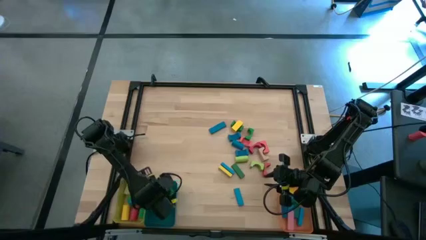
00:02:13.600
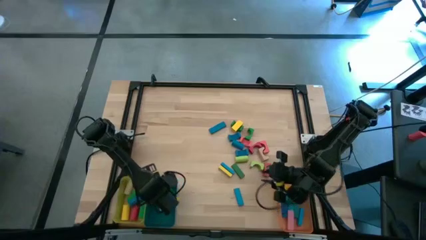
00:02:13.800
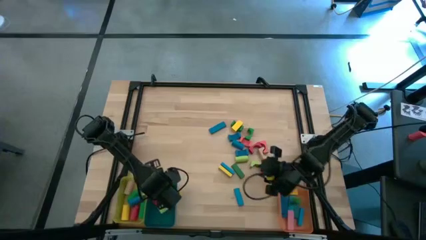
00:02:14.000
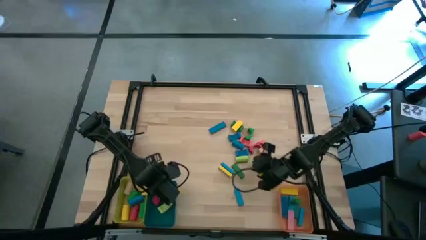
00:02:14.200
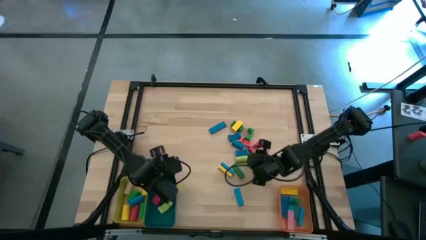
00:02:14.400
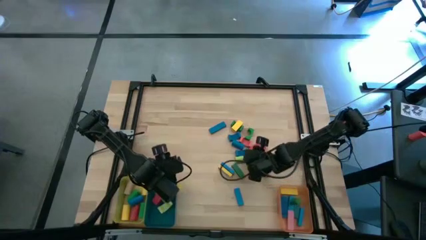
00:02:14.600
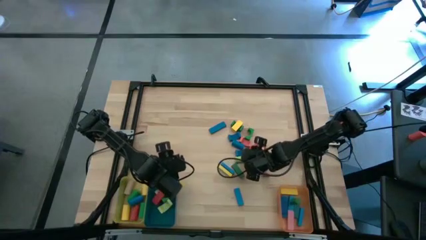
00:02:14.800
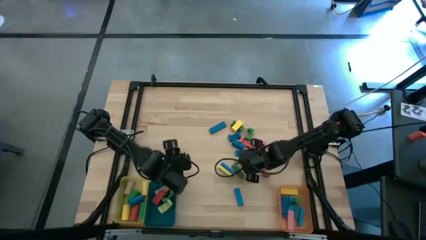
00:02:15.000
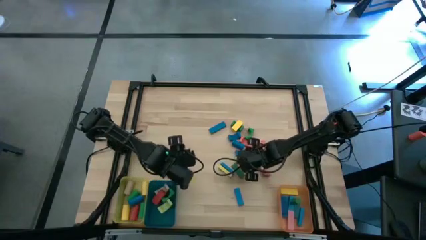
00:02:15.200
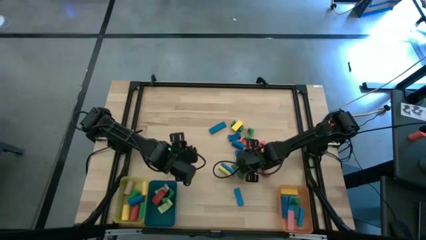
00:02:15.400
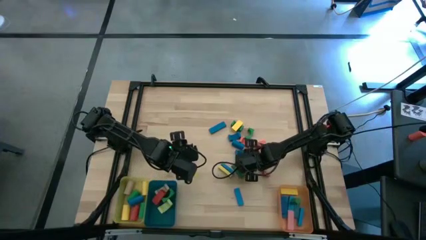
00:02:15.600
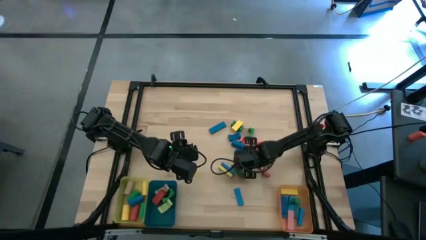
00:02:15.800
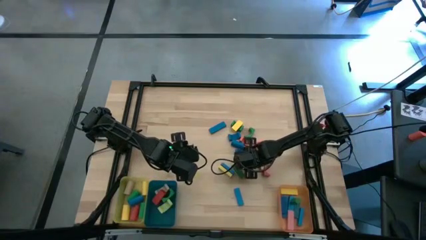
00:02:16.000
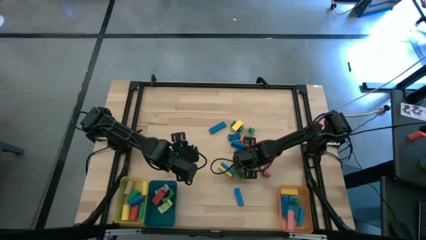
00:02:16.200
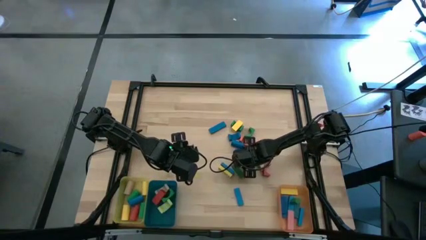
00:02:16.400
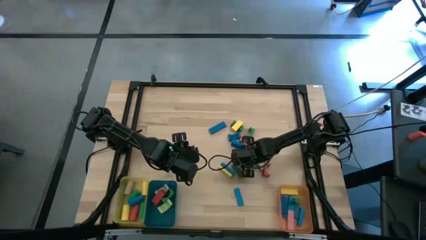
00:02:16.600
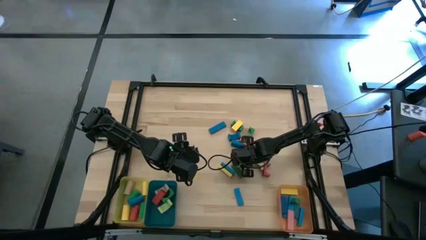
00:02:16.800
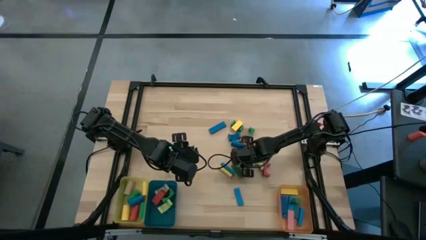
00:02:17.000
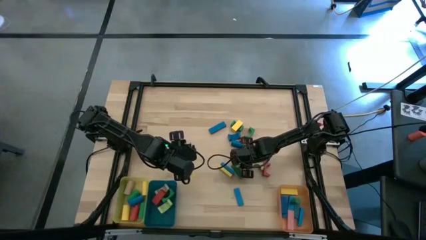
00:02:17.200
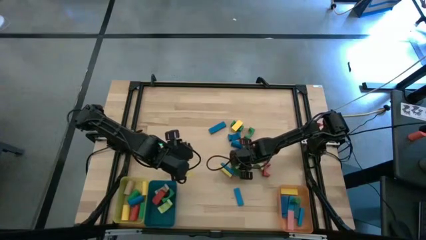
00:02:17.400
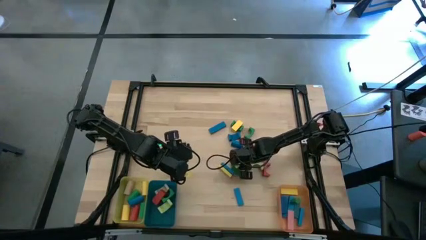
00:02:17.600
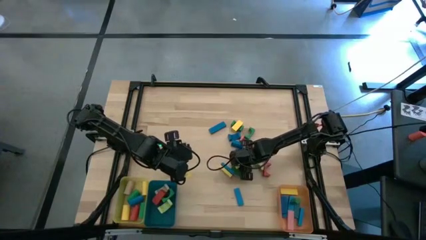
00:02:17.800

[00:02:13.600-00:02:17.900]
Task: Sort blocks by size
Put the light green cylindrical block into the yellow bin

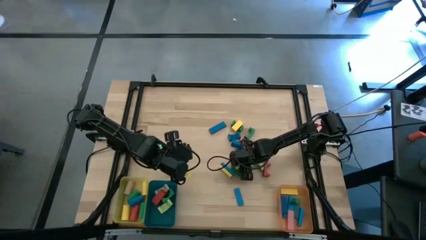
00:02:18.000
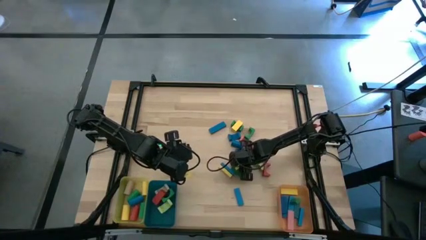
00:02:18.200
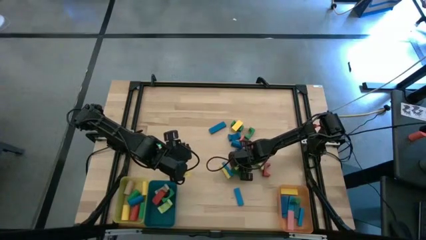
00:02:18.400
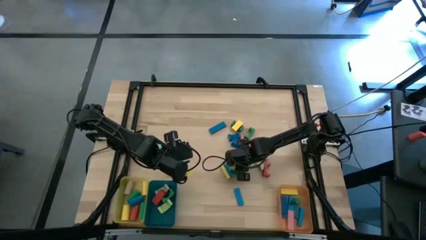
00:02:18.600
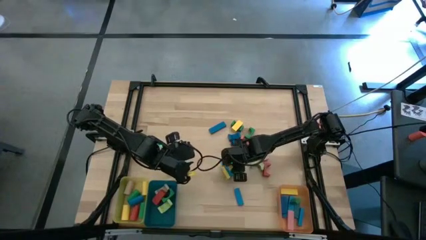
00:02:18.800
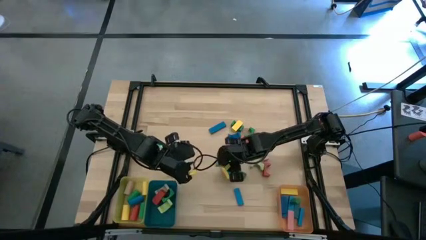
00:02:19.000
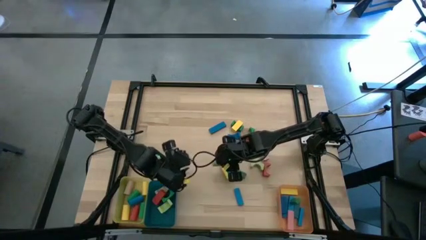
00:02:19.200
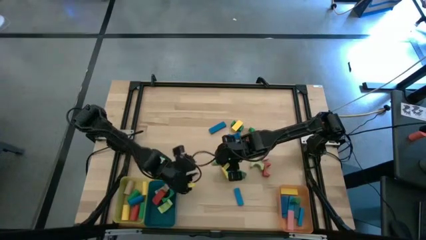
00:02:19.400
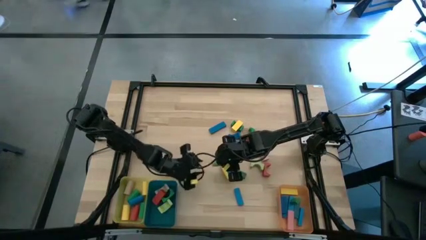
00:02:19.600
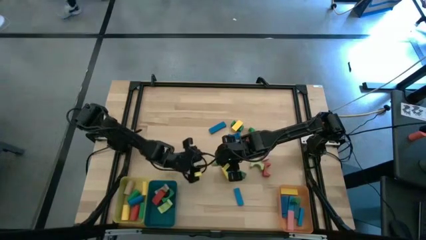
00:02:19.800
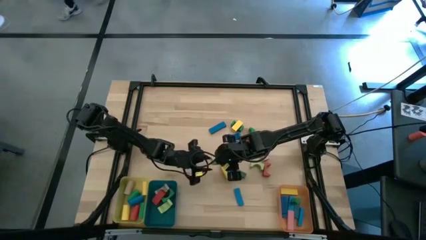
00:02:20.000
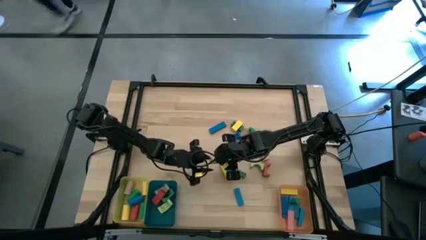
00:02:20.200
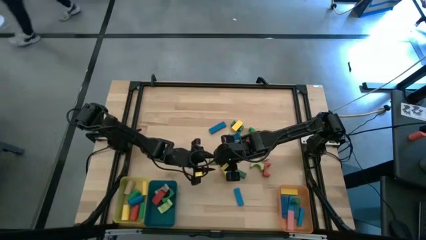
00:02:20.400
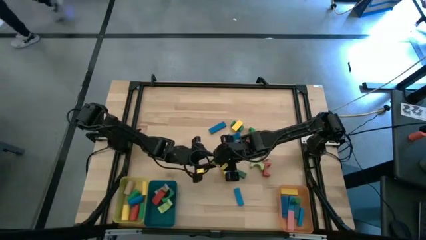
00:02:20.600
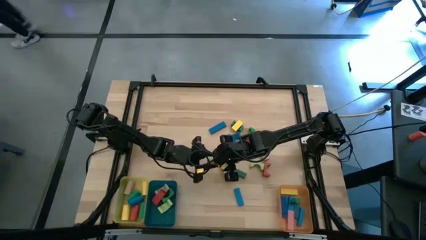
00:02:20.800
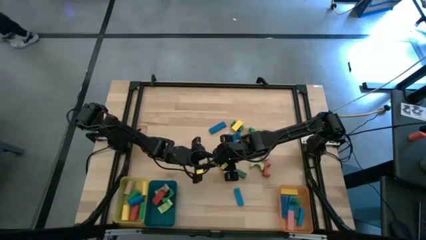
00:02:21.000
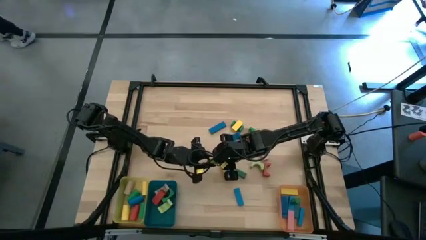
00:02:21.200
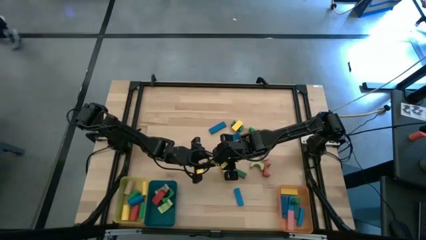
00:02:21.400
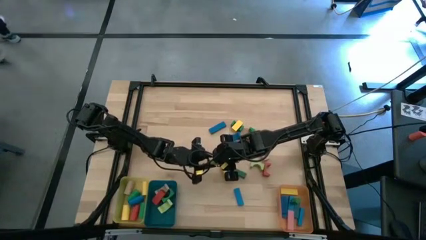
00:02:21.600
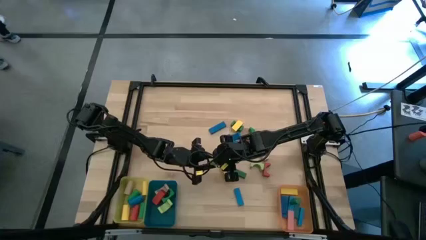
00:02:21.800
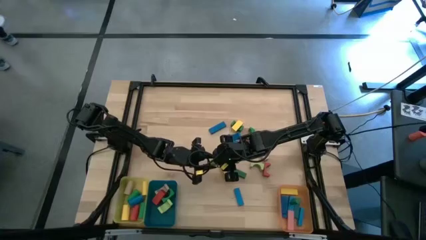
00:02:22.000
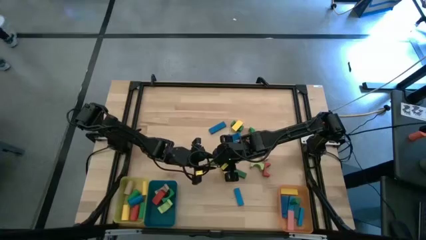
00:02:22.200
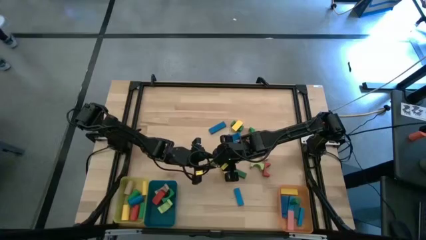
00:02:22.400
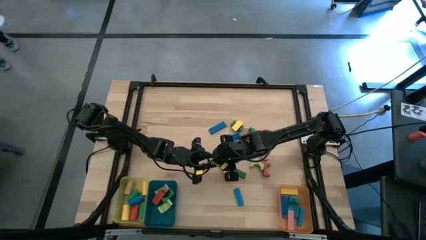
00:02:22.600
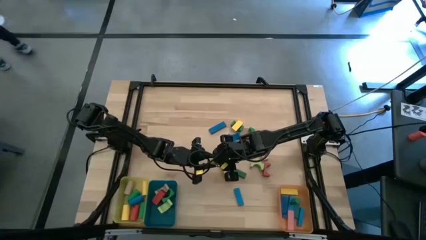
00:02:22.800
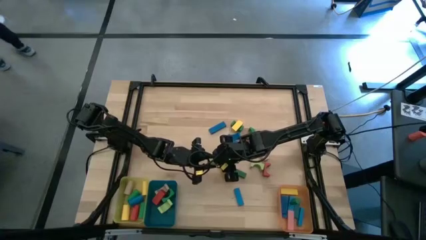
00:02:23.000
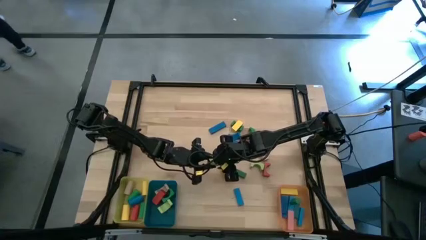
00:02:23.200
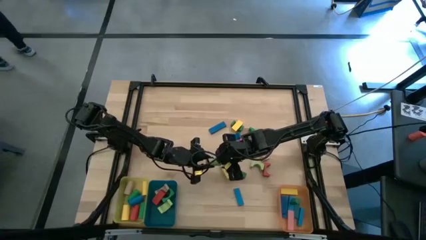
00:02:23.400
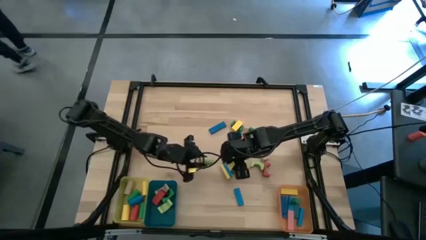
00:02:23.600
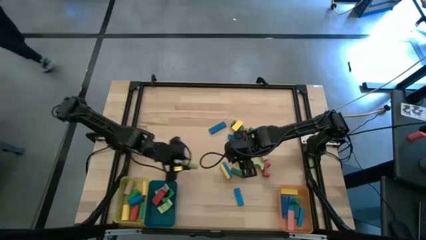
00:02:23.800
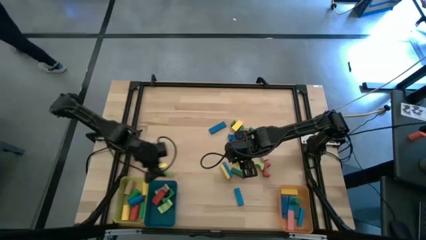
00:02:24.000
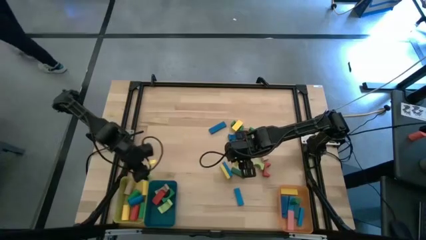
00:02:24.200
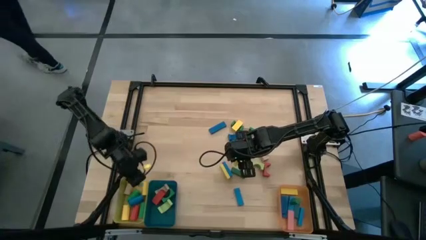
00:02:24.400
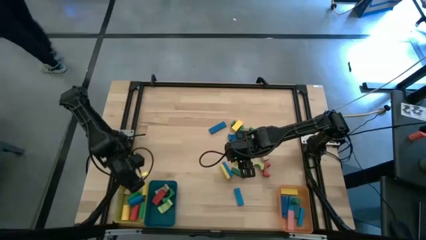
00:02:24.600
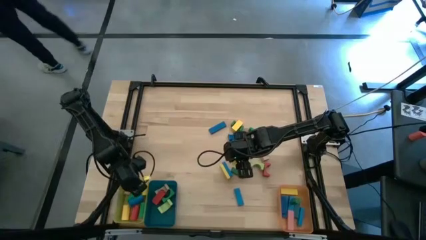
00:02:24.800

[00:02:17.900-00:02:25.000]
Put the light green cylindrical block into the yellow bin

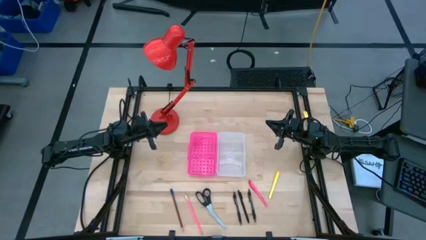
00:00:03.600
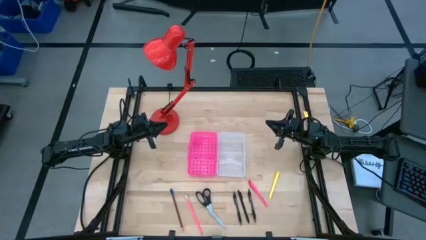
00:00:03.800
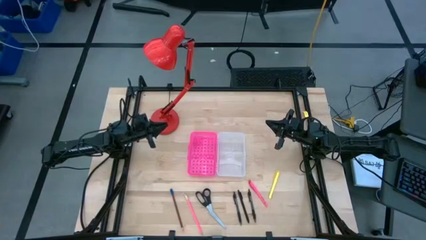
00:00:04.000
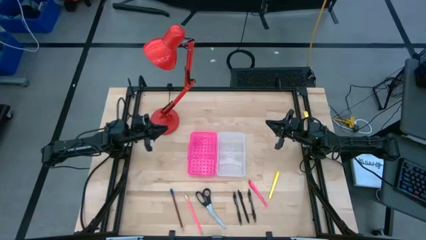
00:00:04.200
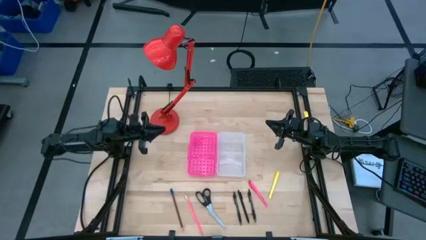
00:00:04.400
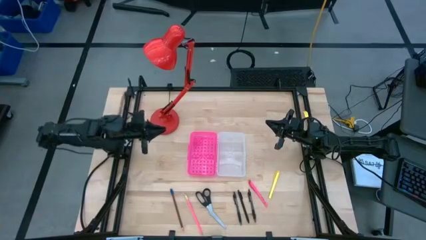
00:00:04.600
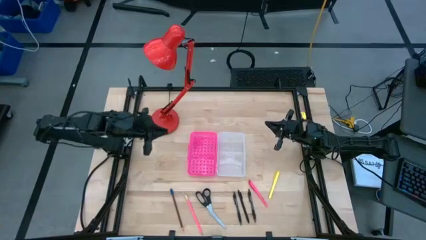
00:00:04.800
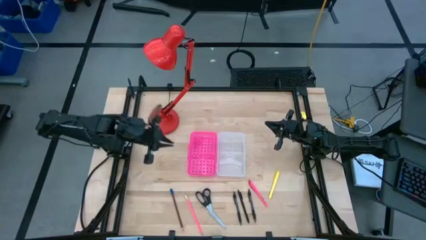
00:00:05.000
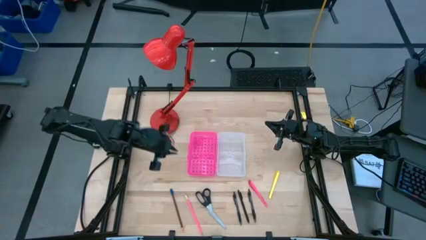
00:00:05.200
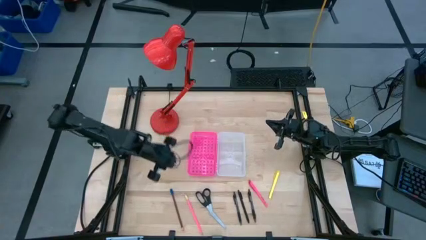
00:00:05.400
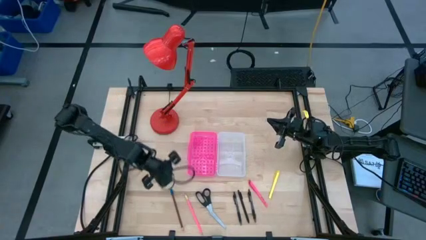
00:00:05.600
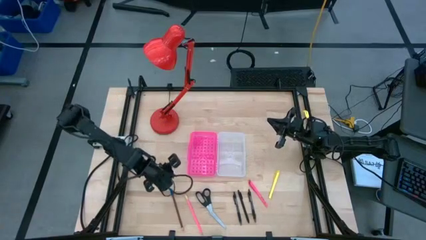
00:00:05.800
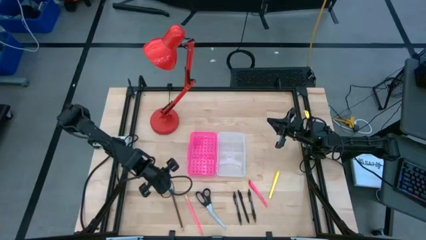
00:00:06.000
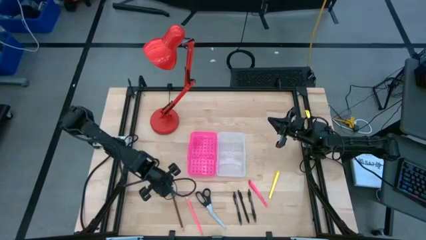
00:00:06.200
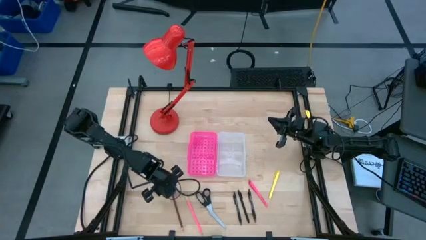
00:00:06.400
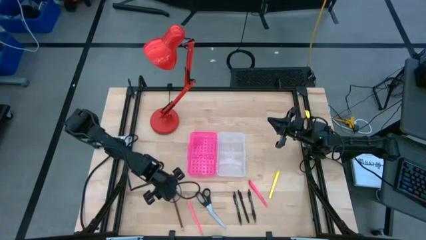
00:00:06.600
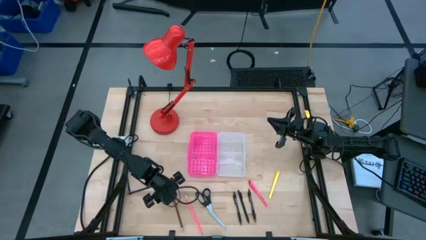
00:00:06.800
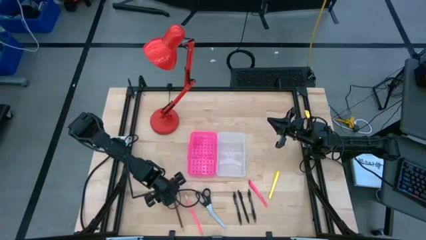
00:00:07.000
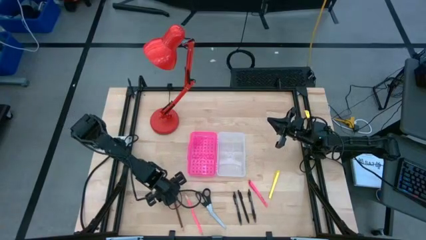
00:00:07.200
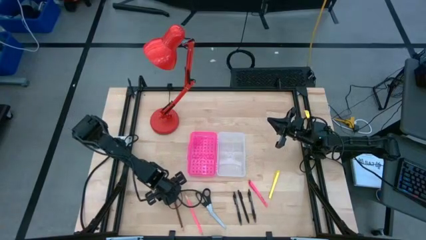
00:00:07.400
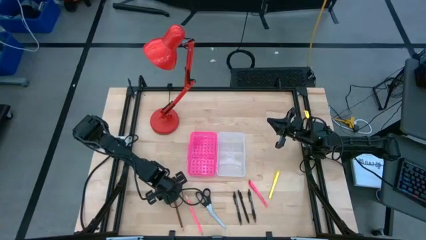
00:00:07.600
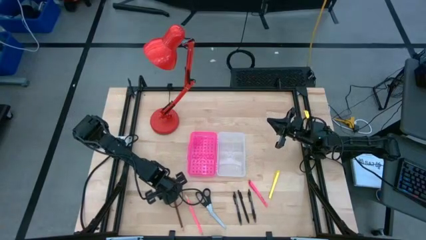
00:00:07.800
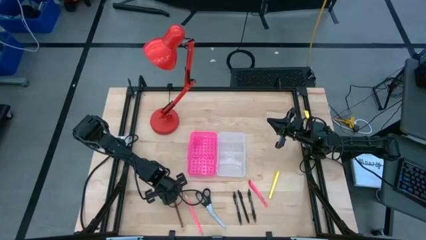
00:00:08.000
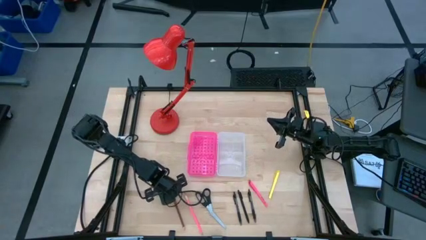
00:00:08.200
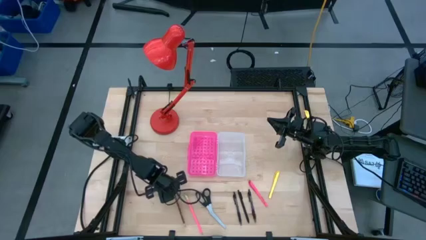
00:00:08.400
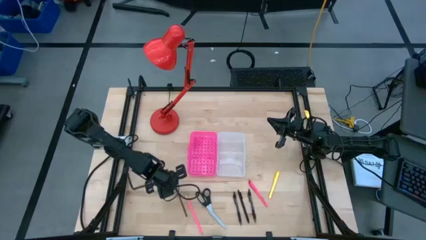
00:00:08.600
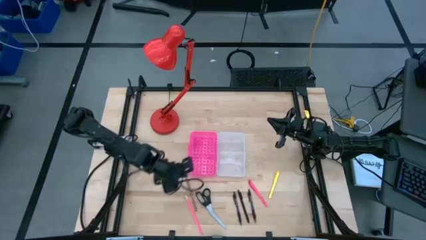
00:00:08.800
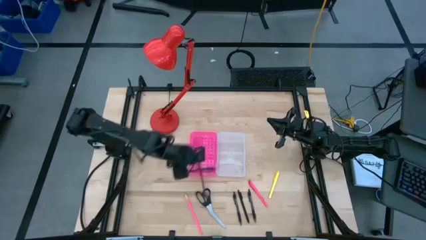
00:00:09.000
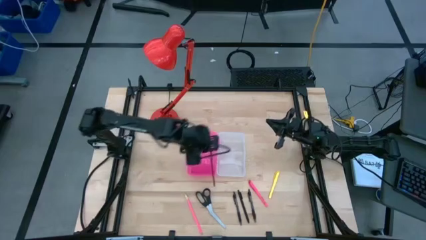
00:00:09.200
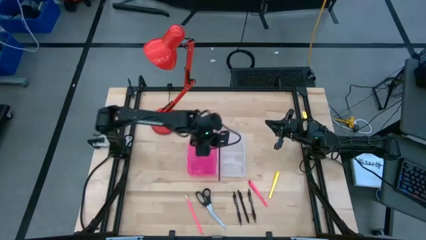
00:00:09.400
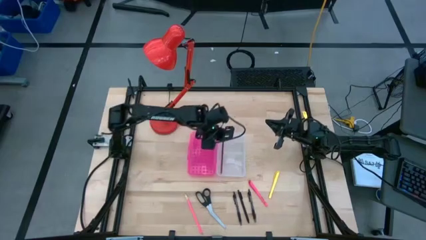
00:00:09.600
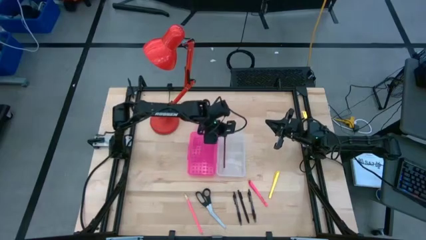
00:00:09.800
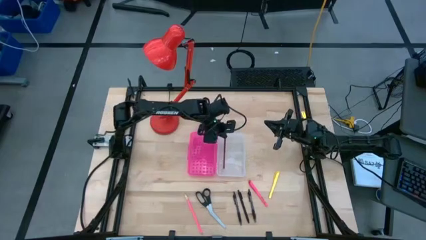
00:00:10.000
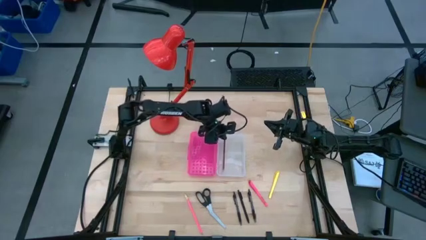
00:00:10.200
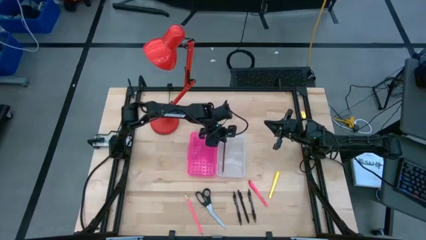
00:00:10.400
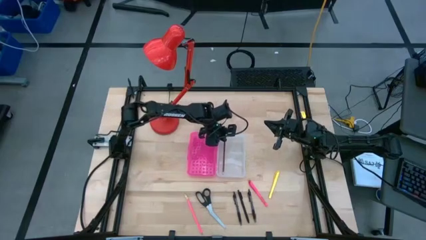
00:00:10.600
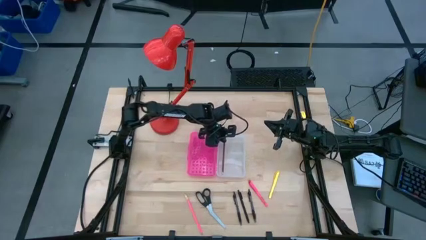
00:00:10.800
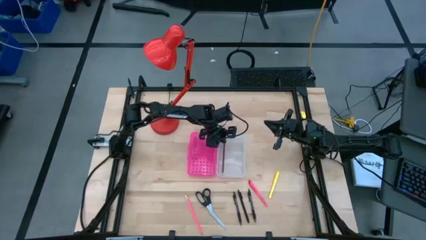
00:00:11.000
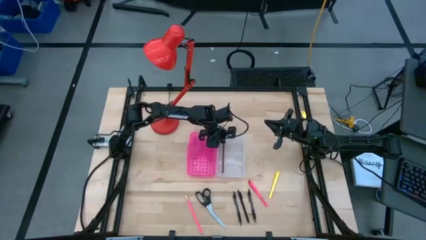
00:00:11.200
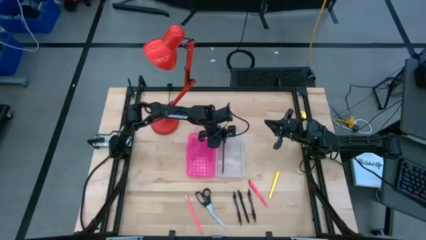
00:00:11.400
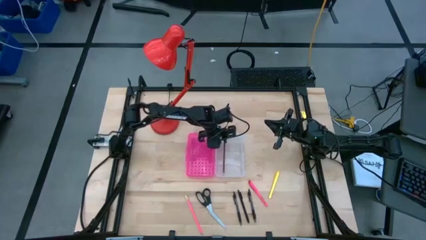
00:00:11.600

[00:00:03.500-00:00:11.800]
Task: Pick & place school supplies into a supply box
Put the brown pencil into the pink supply box
